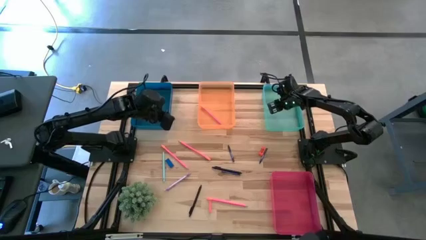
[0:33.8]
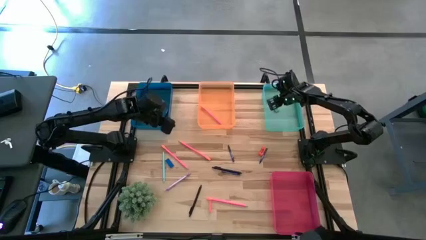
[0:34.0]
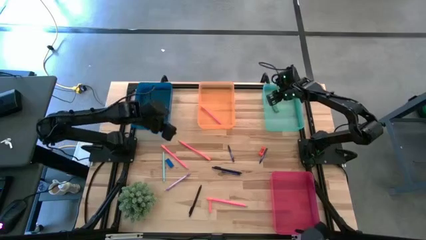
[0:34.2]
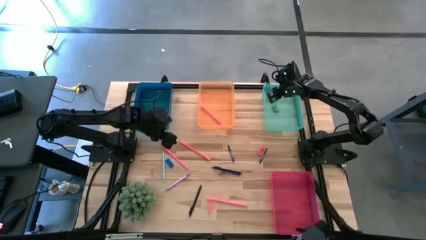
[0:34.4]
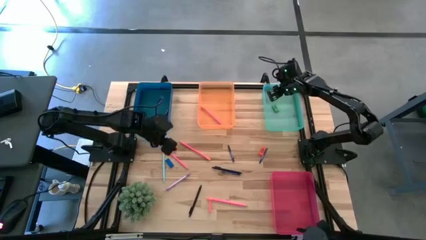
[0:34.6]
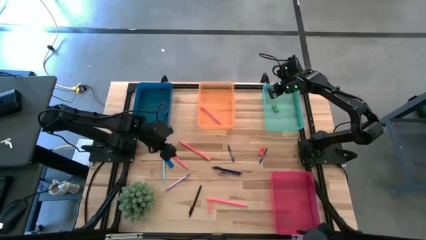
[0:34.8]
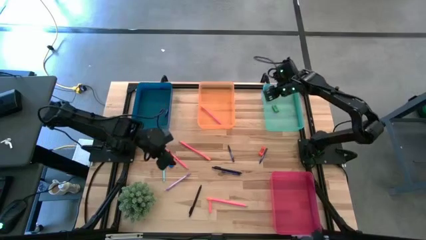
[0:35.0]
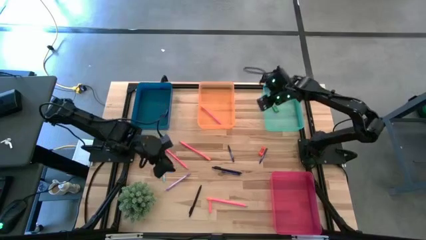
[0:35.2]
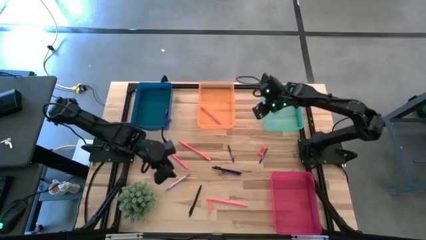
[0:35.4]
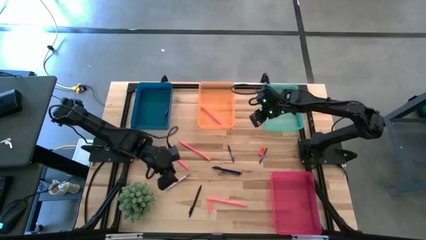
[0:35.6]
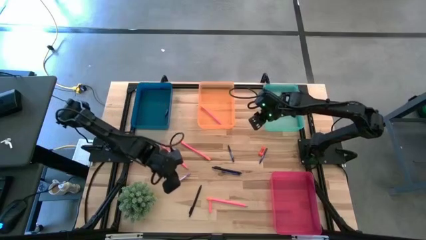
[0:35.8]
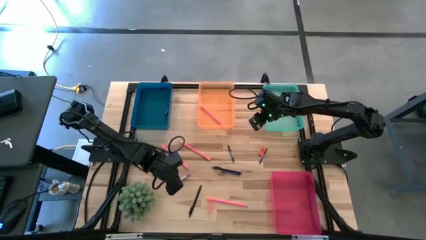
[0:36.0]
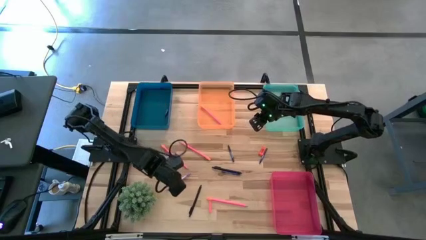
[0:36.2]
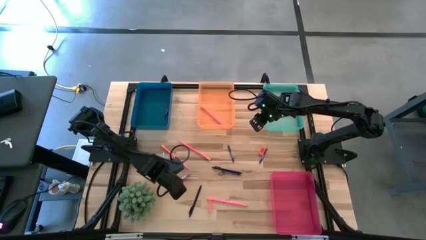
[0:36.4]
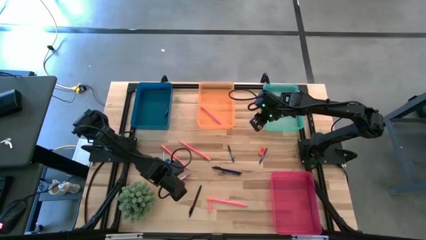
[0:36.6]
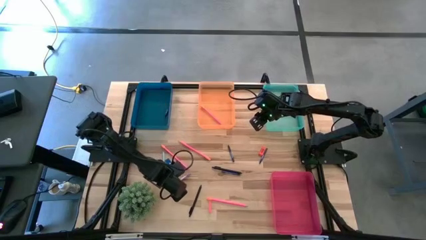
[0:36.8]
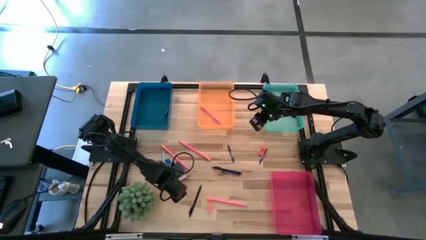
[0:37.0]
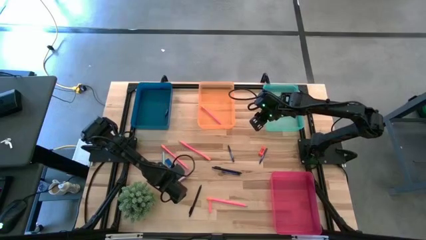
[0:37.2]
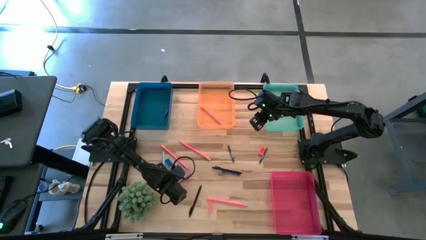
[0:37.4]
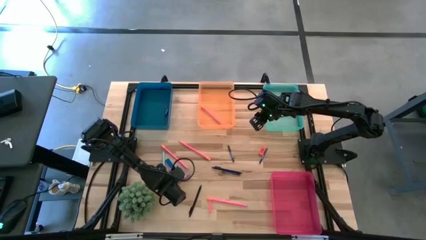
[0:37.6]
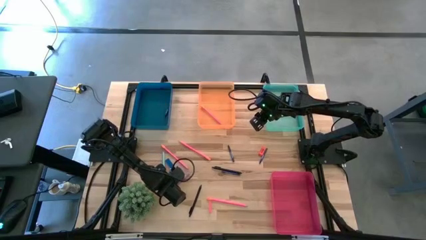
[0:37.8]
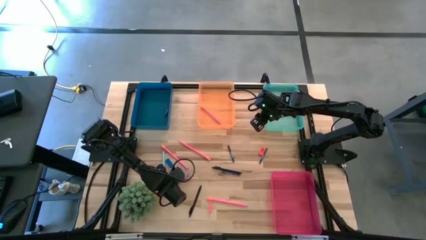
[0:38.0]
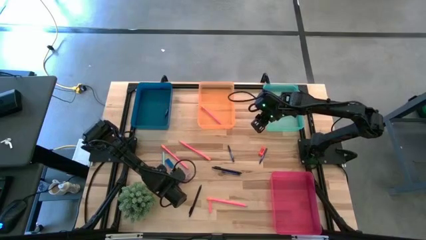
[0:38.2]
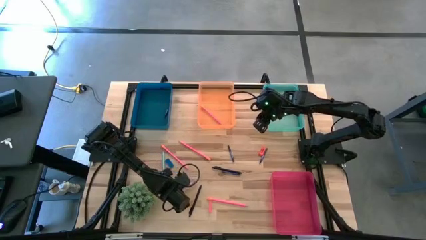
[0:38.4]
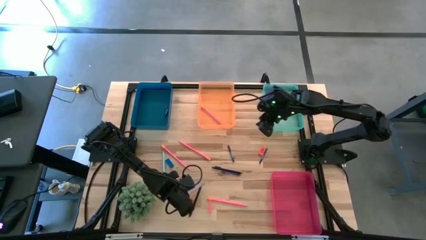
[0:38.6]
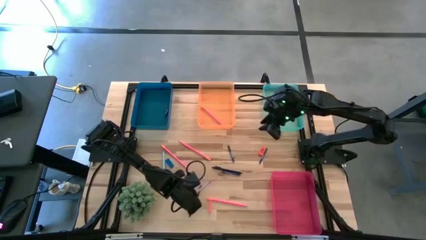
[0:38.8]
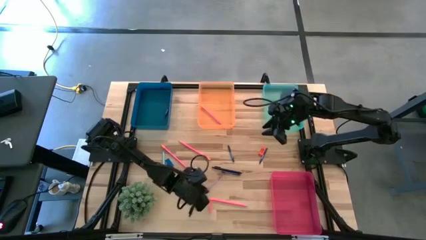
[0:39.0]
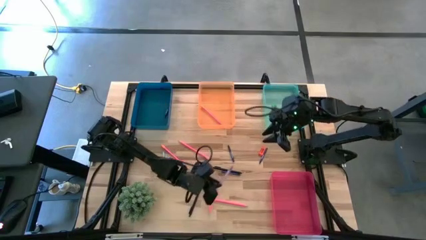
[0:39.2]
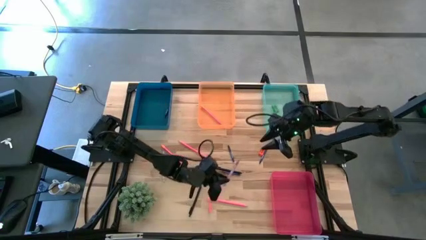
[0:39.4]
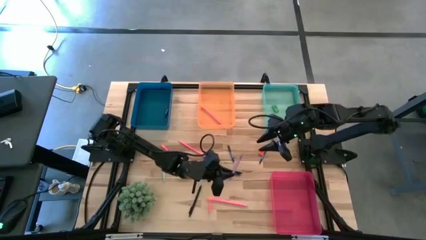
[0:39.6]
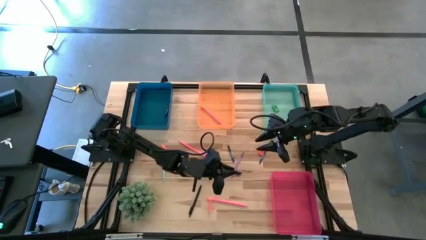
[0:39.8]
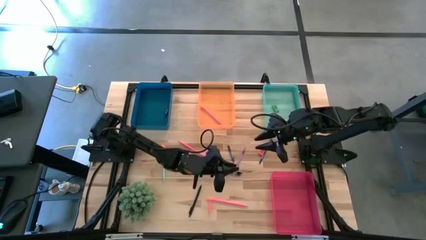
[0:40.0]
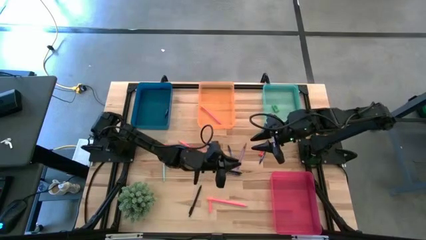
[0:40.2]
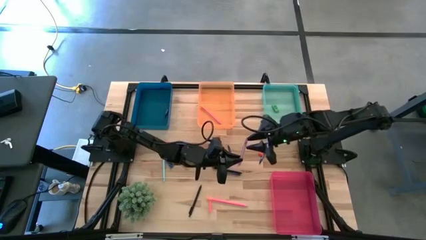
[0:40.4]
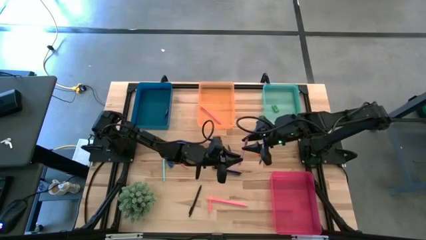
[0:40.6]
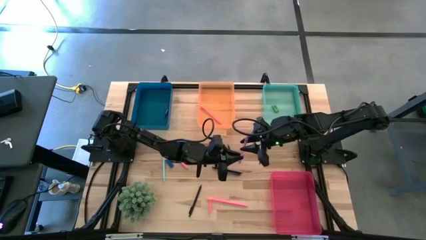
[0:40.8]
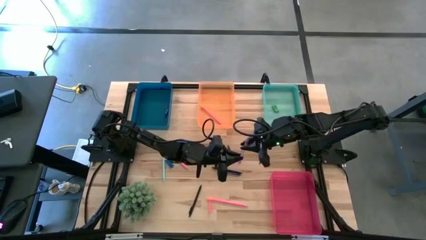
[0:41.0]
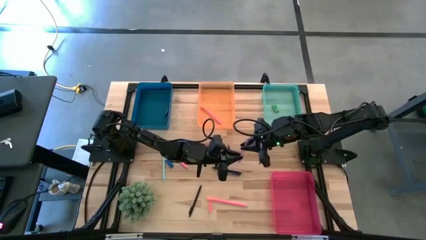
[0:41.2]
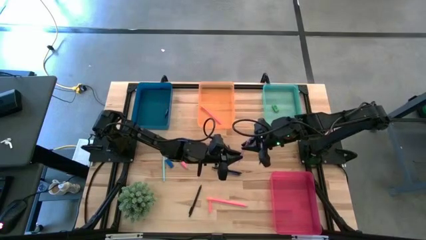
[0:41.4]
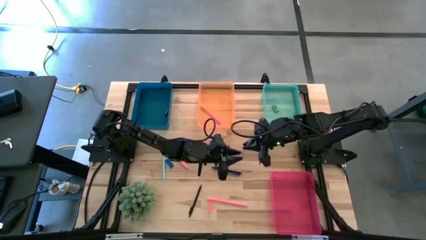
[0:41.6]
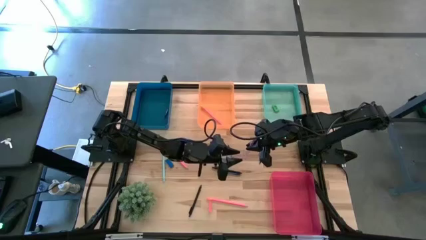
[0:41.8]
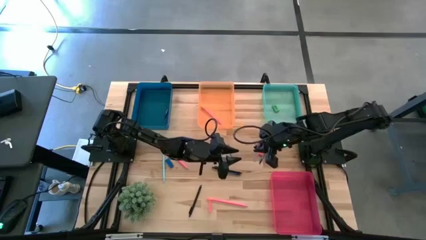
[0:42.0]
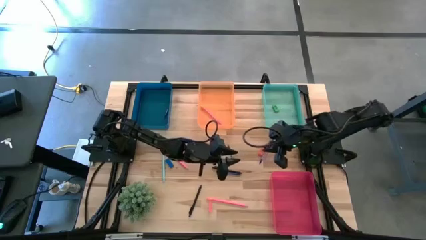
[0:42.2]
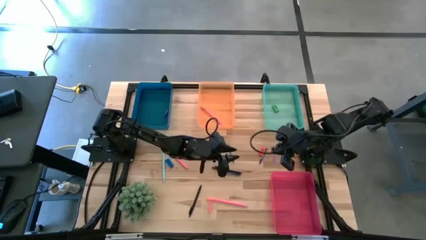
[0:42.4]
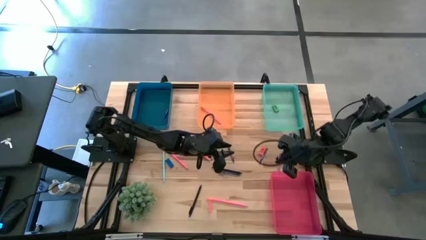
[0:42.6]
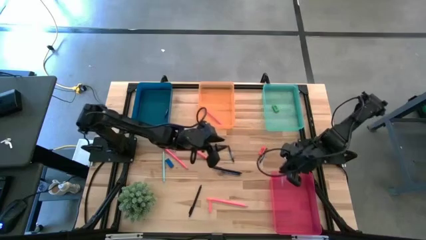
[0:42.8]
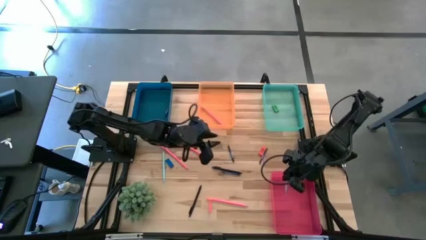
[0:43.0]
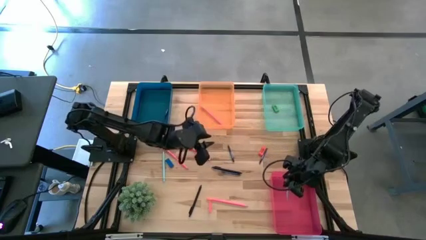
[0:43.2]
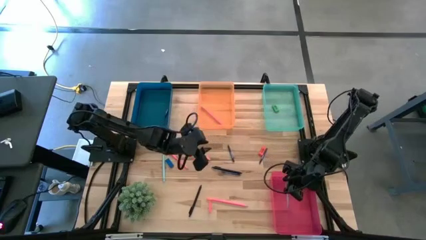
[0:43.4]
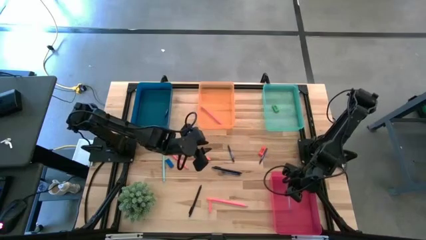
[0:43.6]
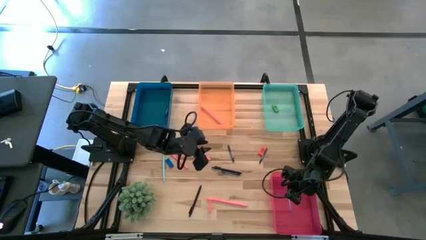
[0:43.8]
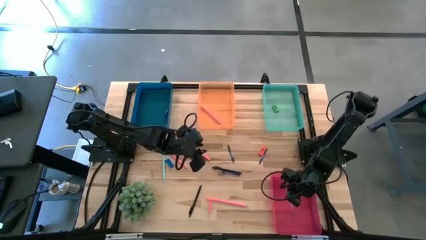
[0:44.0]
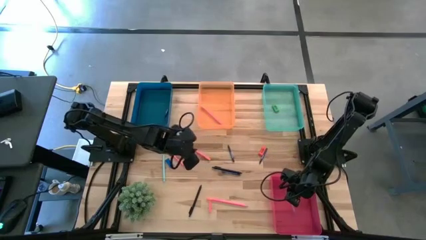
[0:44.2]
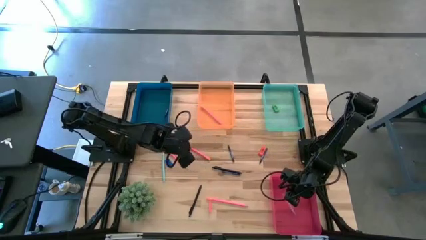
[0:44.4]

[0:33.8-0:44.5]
Task: Sort crayons/erasers/pens/pencils in bins
Put the purple pen into the pink bin
